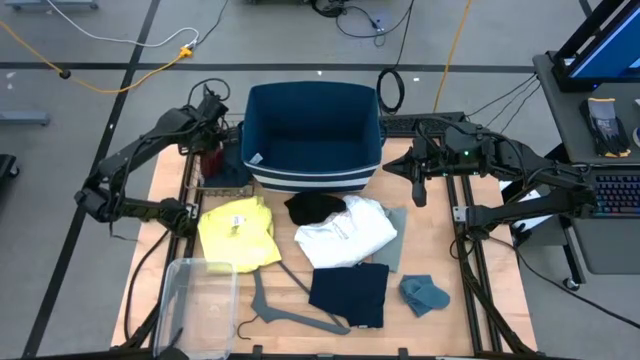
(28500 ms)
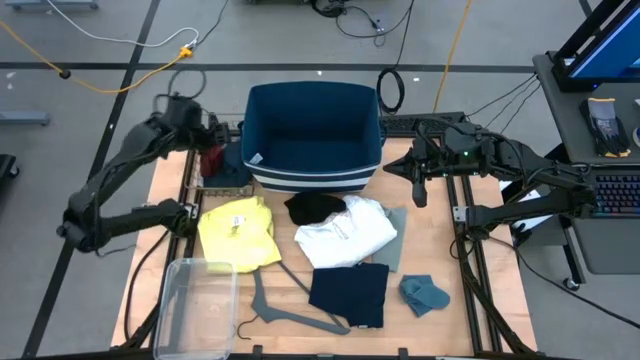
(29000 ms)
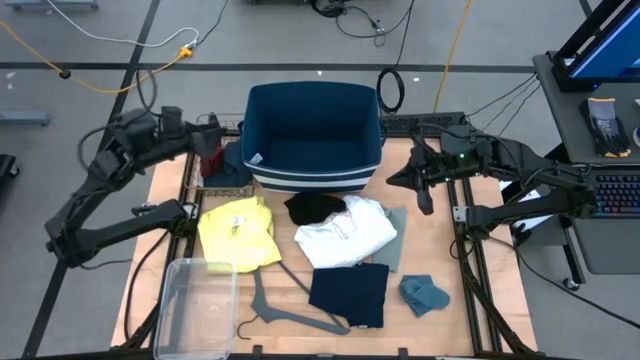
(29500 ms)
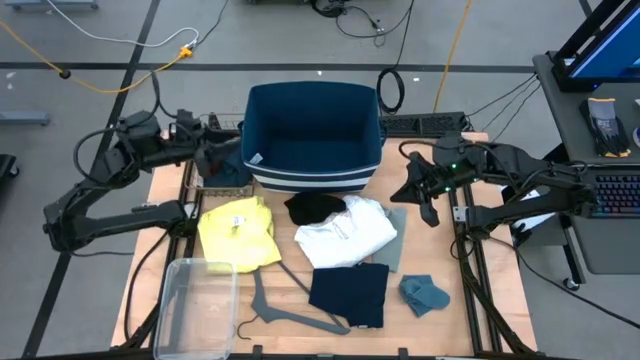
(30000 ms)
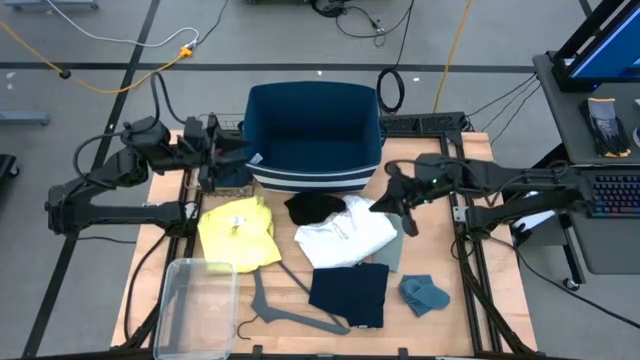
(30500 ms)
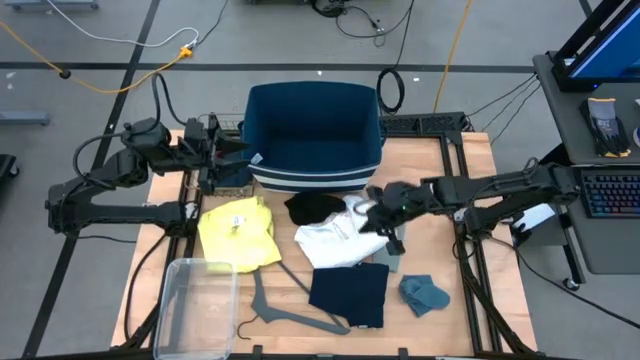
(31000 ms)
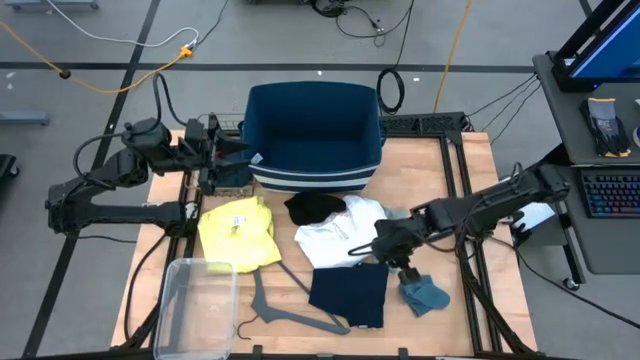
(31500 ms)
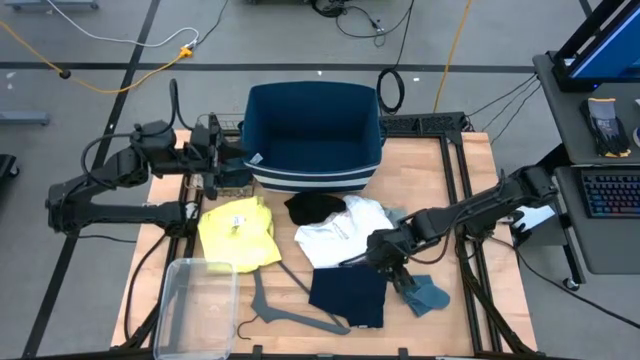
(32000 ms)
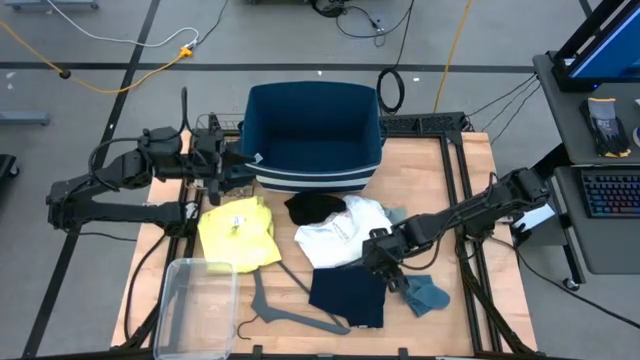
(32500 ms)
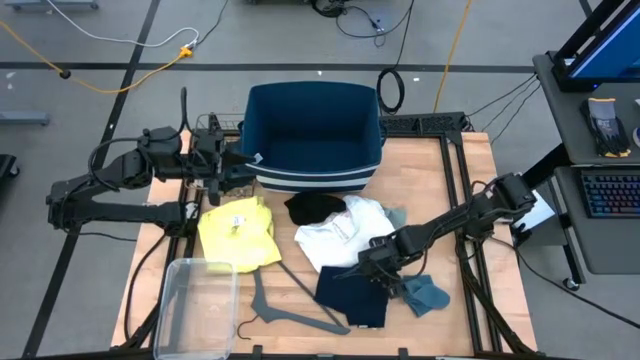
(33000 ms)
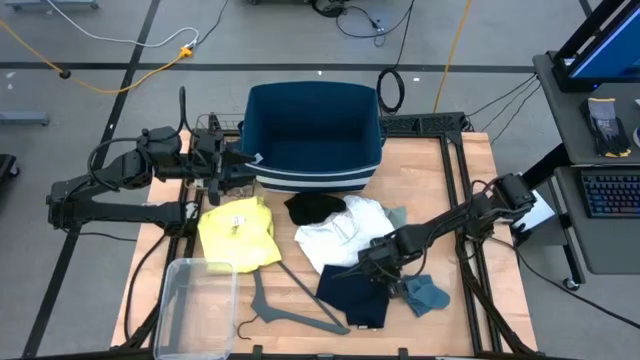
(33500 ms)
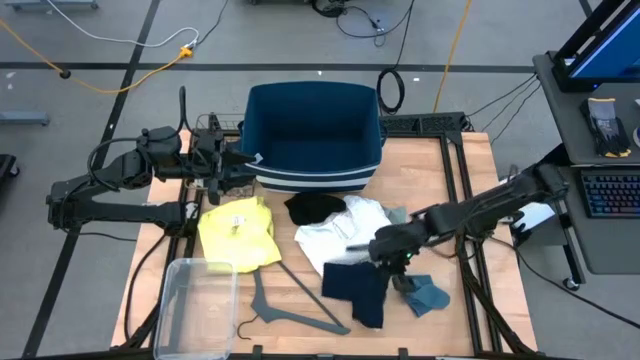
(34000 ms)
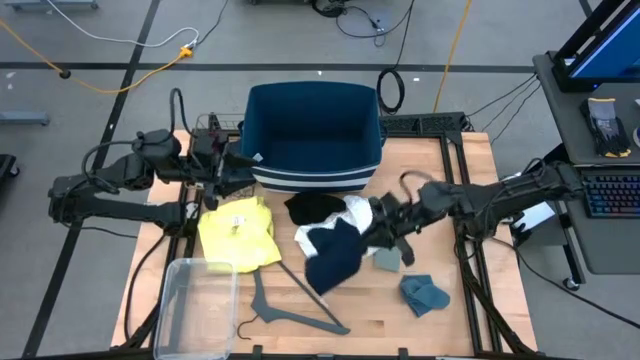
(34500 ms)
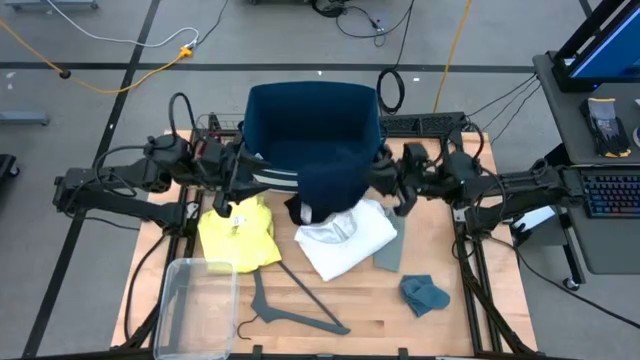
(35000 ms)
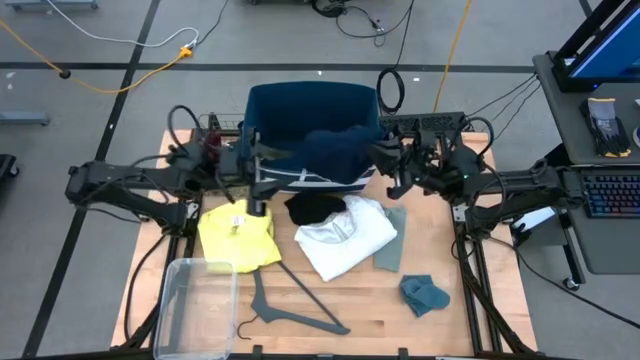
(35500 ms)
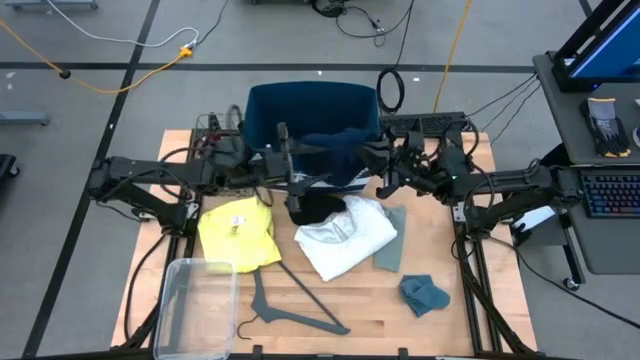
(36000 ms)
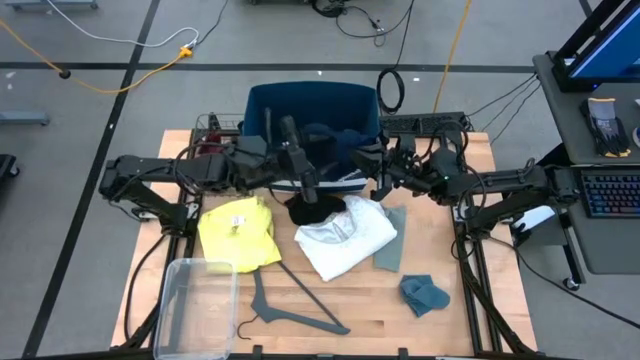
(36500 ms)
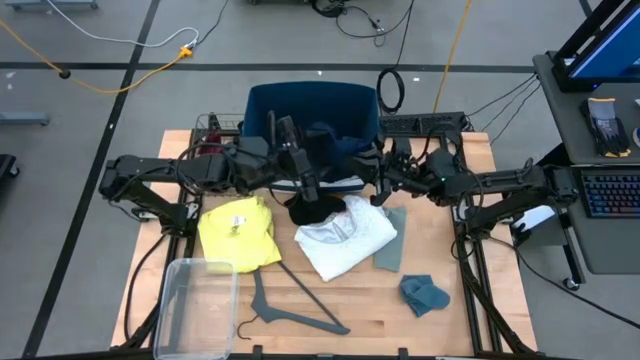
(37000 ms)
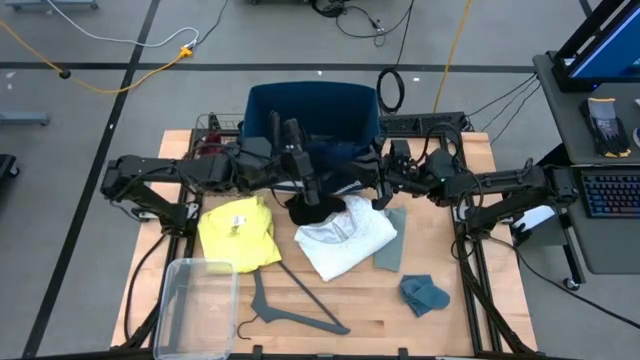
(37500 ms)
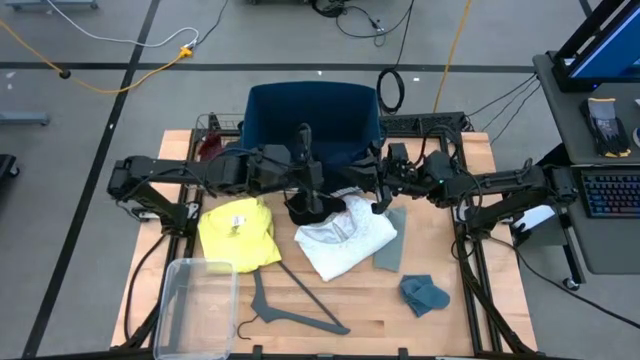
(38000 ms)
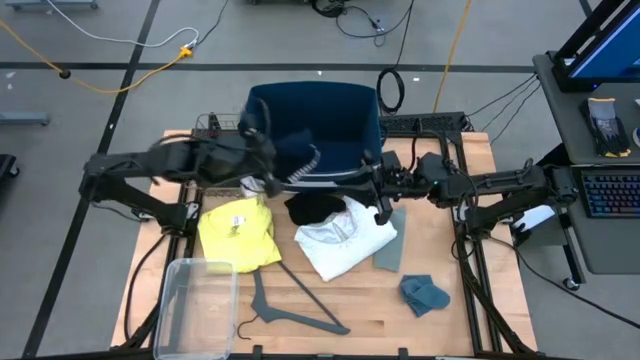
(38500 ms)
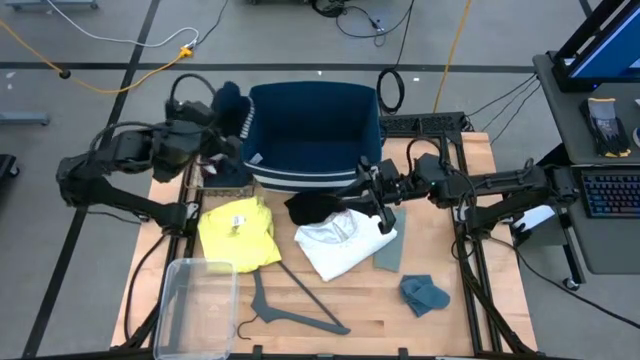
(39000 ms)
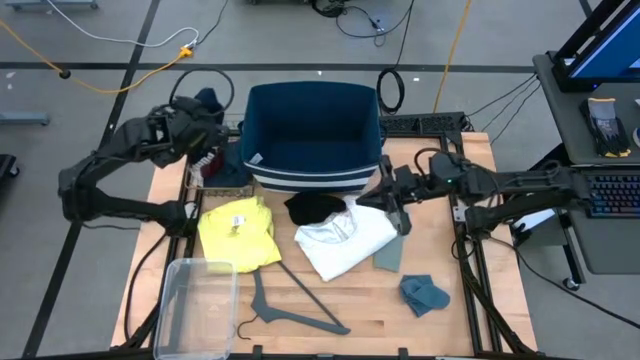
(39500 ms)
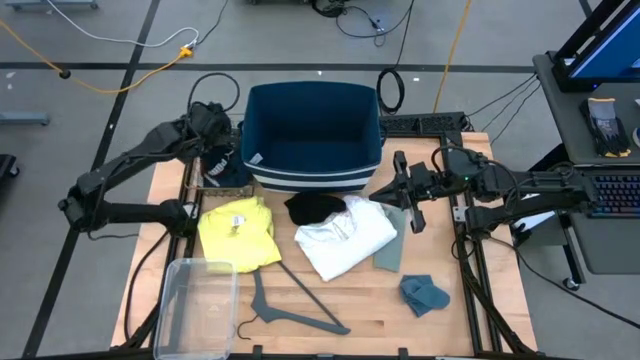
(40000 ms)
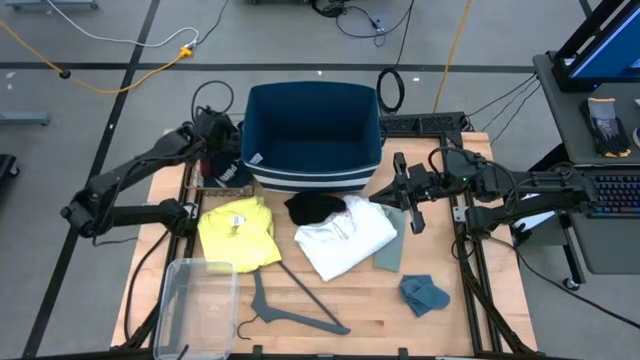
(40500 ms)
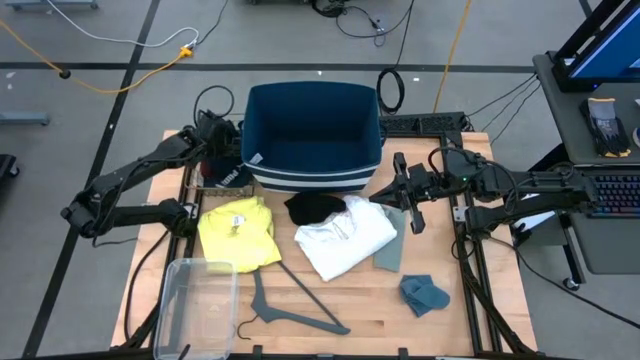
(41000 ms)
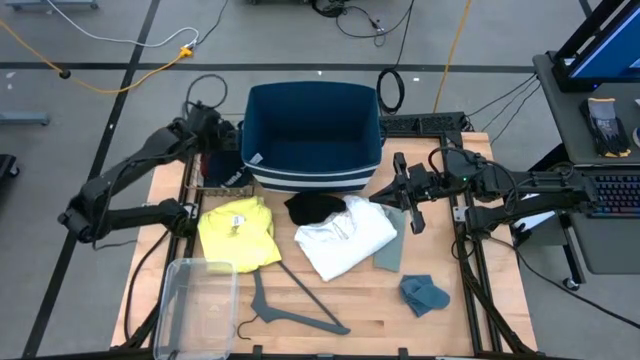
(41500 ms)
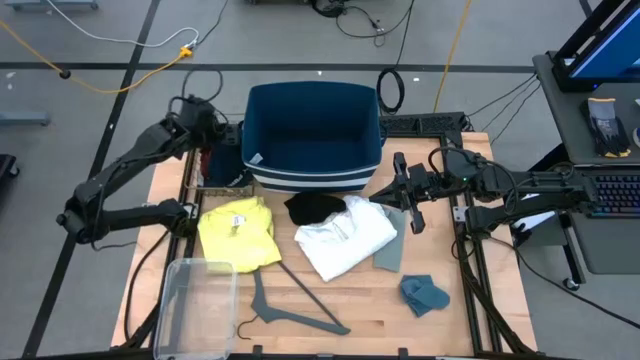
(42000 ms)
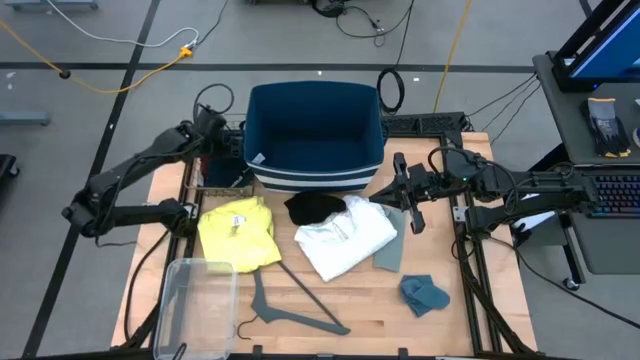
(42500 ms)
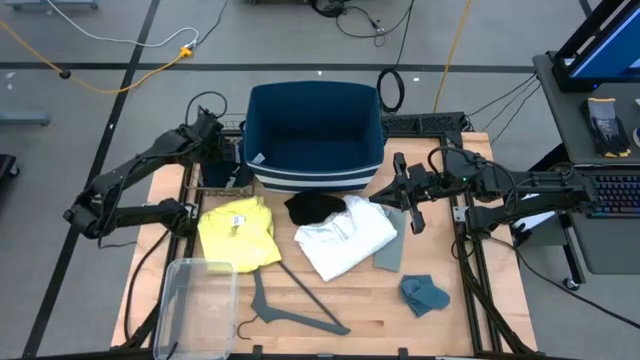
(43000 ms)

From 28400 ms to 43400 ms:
Task: Pick & Place Cloths
Put the blue shorts into the brown wire basket

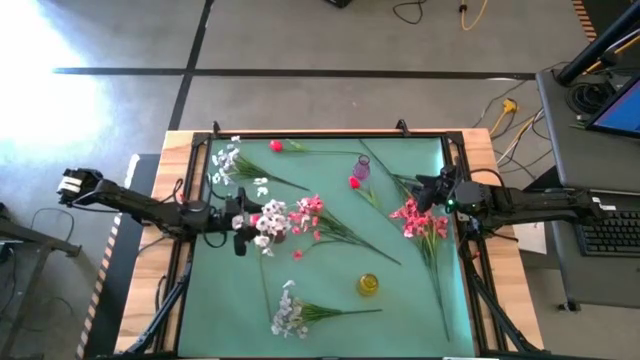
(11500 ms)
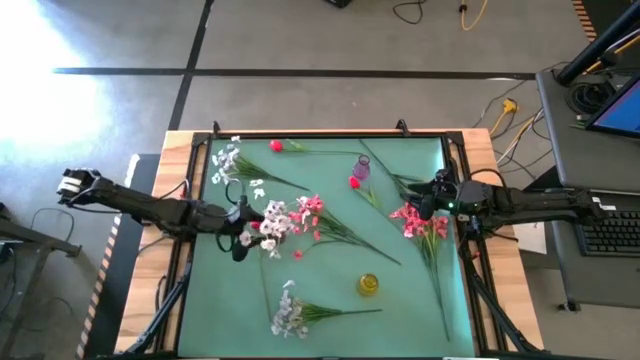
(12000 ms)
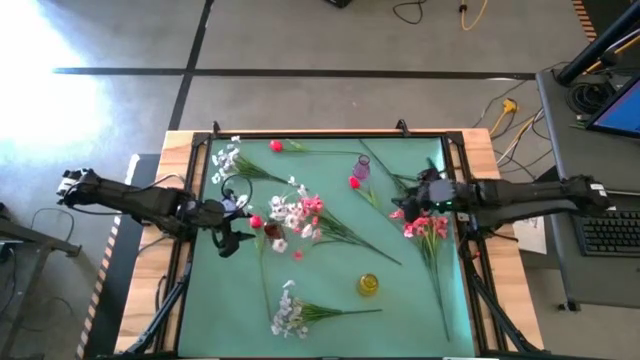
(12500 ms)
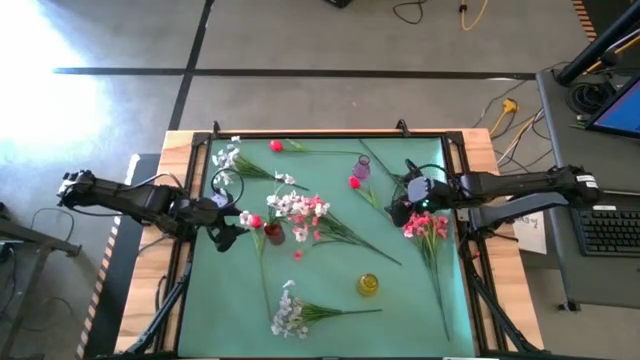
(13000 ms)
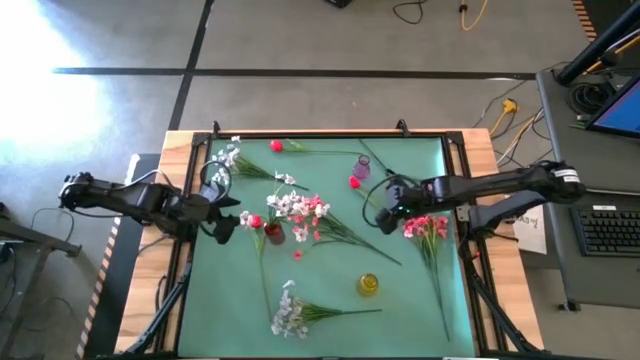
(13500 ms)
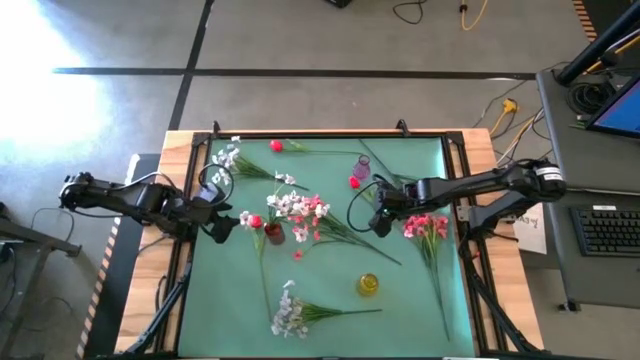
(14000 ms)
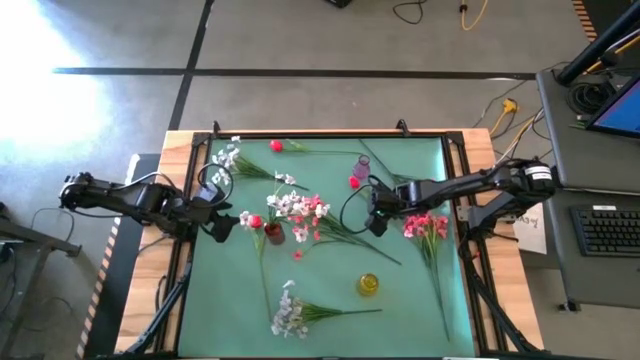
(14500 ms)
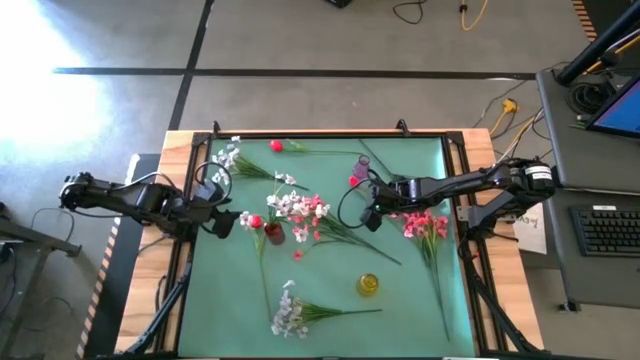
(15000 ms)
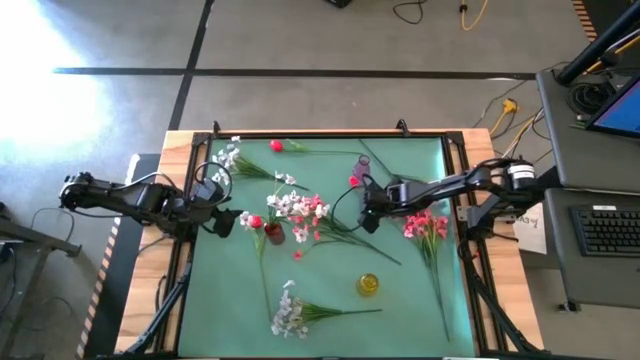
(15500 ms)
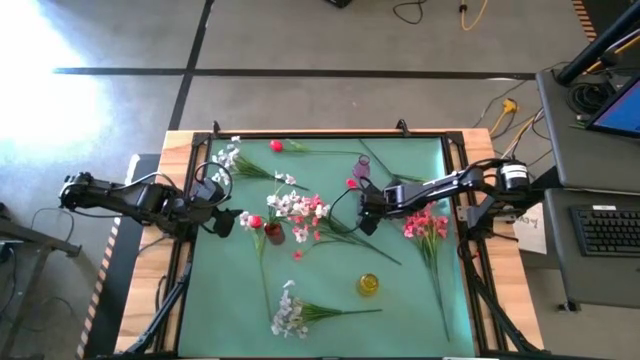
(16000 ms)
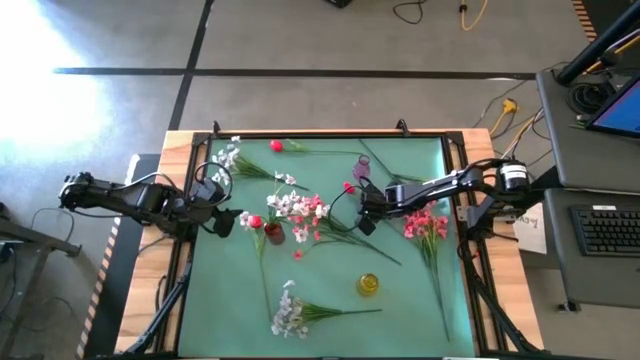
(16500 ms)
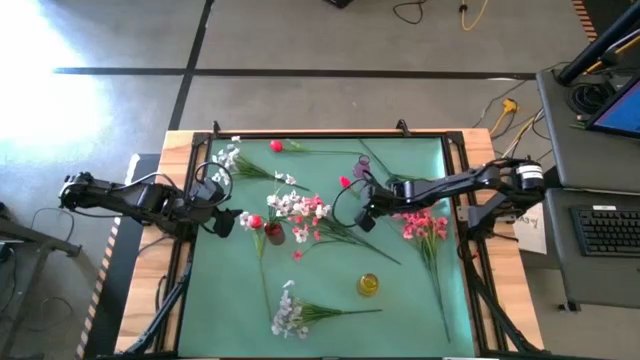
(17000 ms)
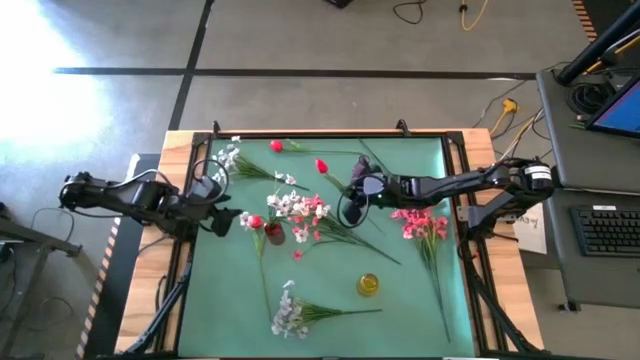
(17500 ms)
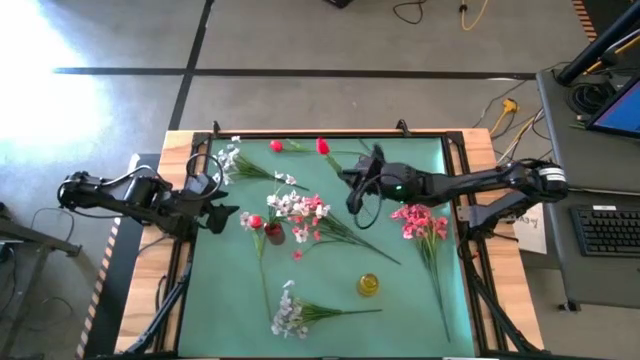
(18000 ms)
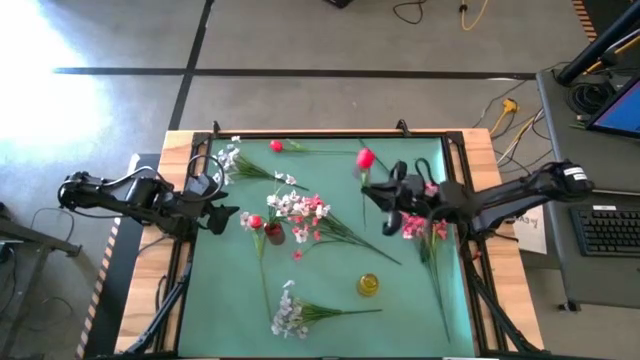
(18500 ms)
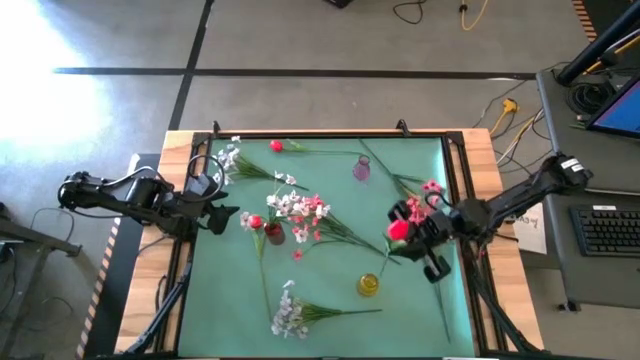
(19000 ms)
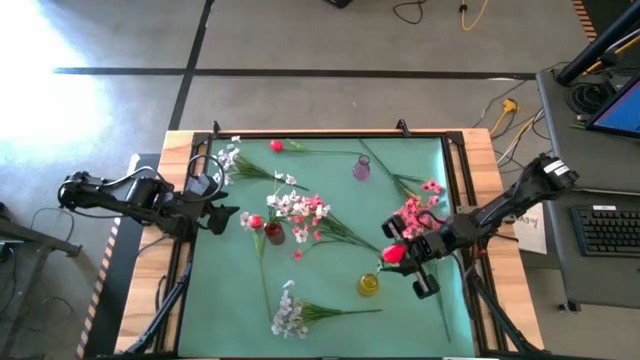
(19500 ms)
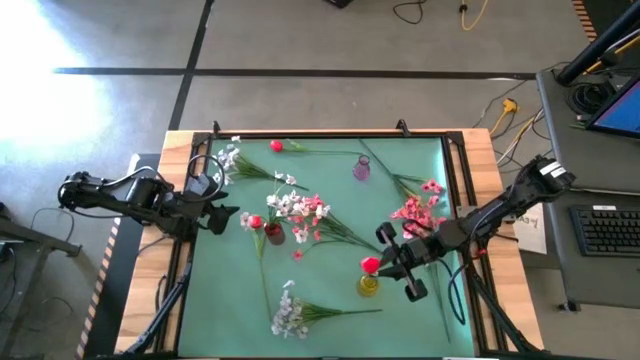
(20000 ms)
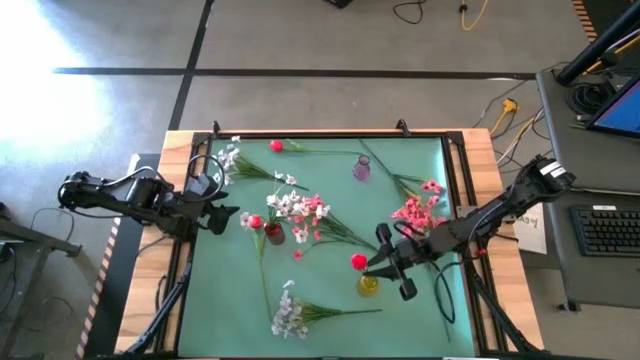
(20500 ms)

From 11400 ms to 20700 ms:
Task: Sort flowers into vase by color
Put the right red tulip into the yellow flower vase
